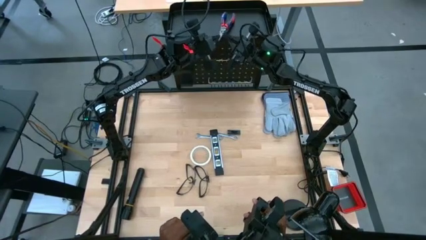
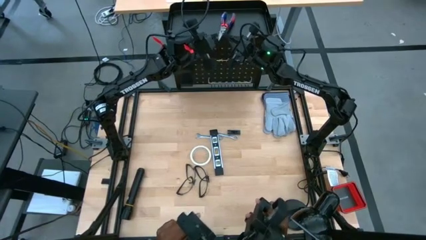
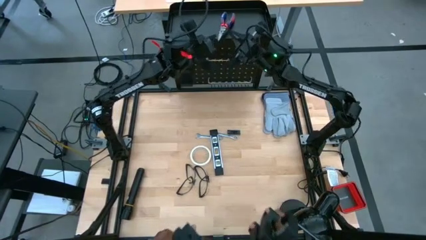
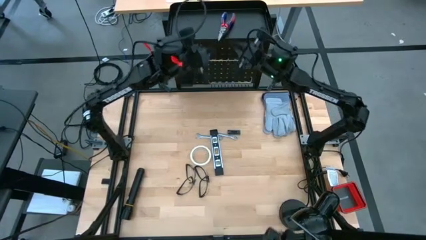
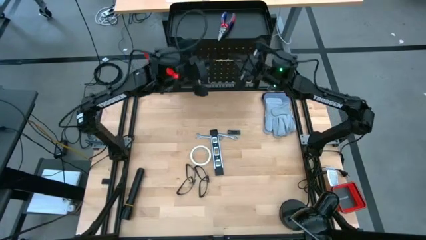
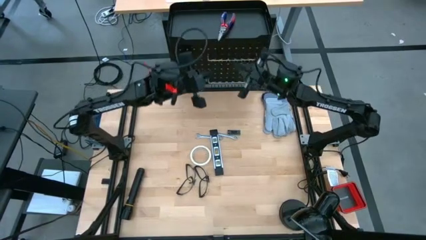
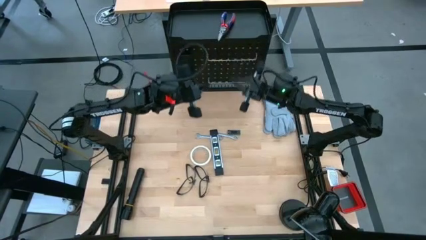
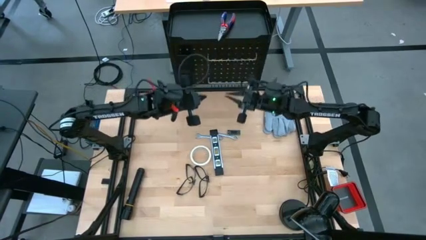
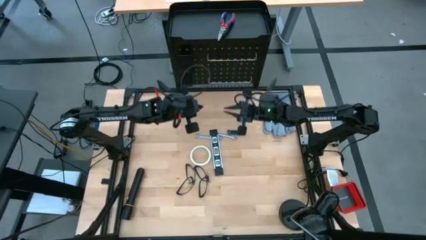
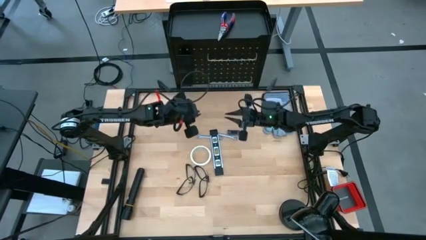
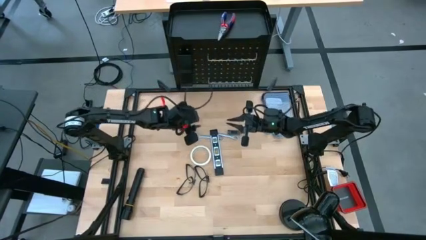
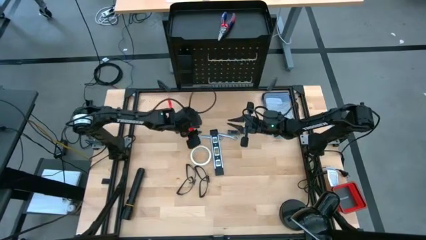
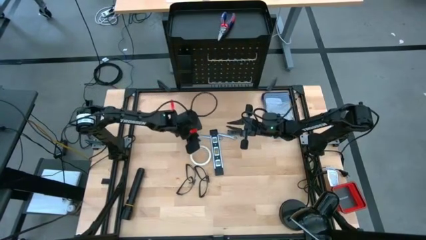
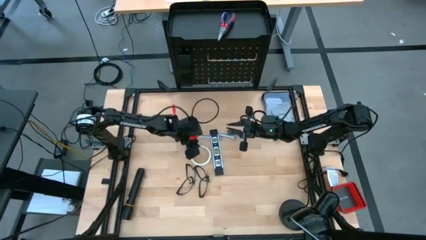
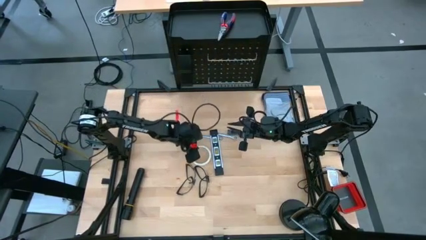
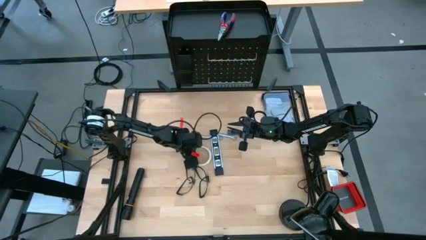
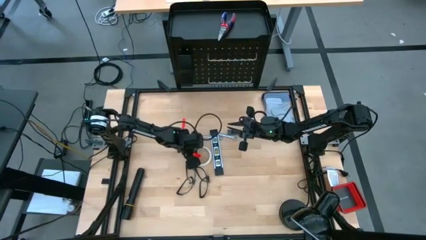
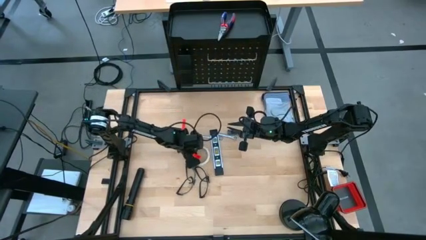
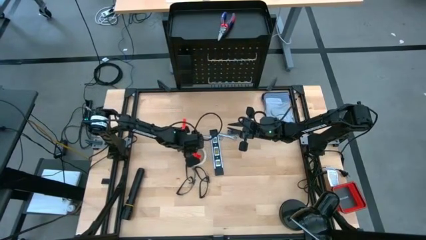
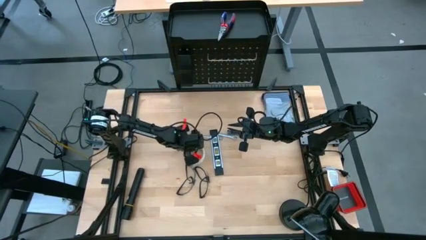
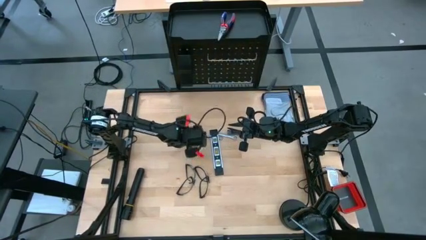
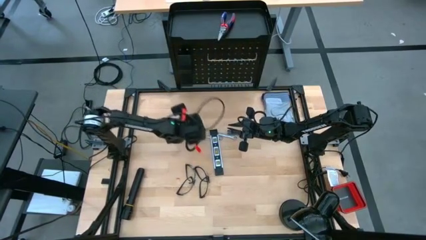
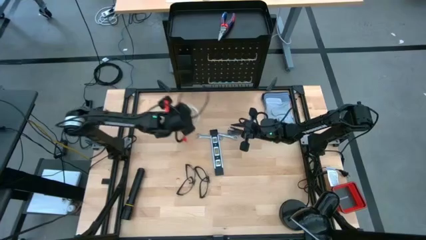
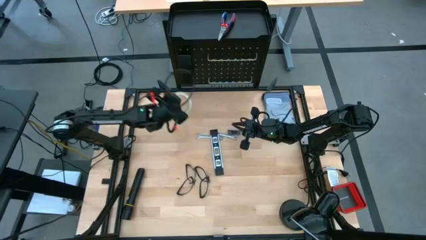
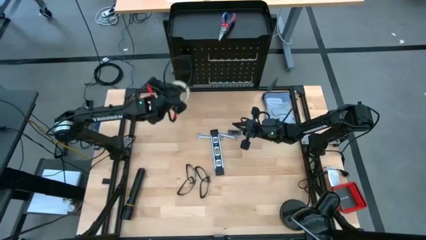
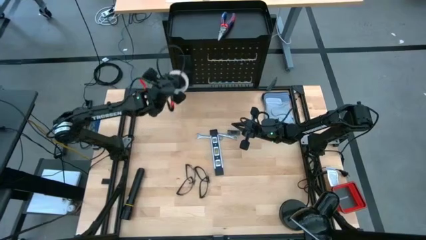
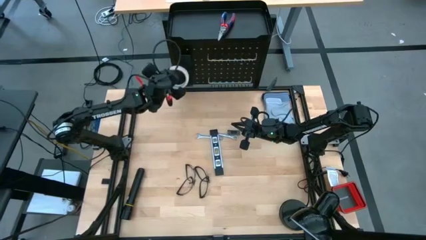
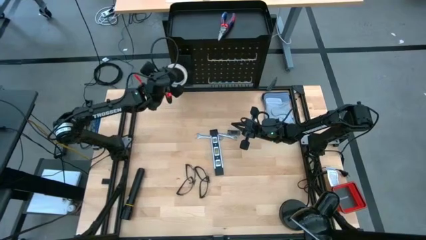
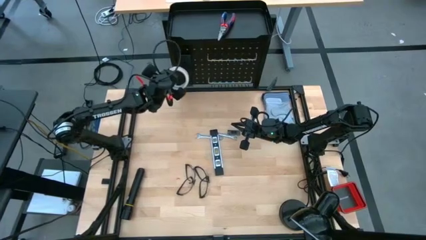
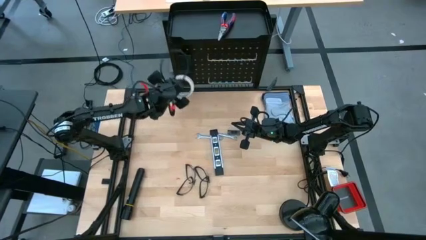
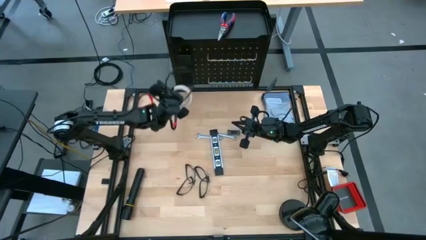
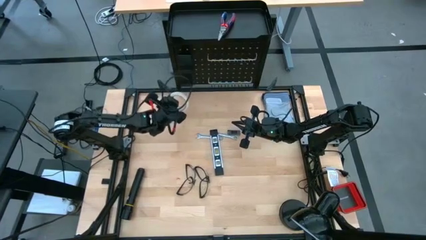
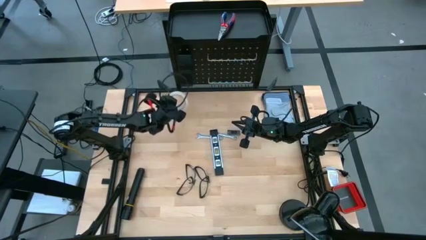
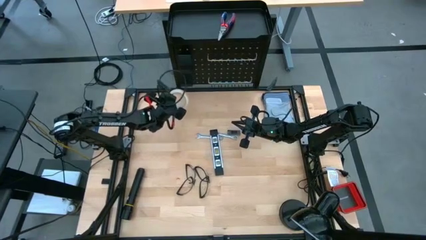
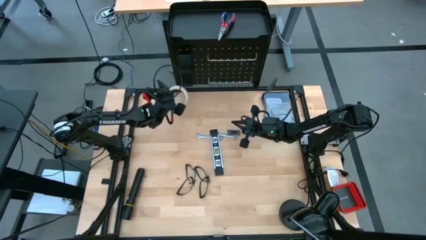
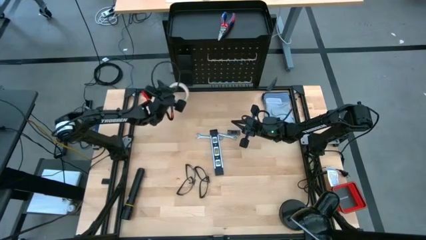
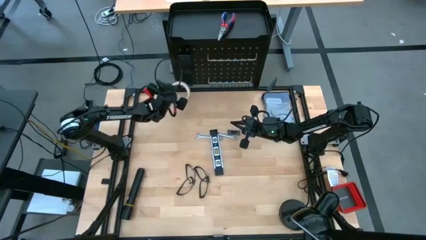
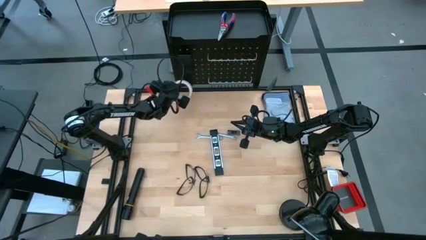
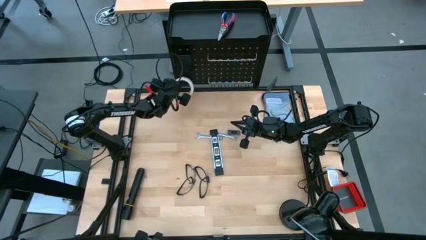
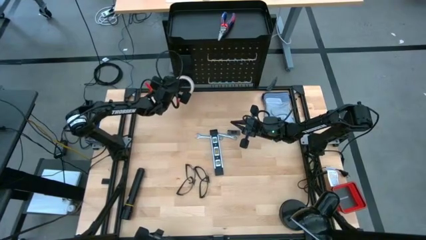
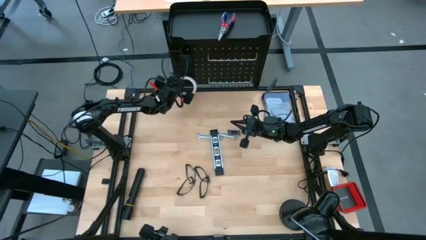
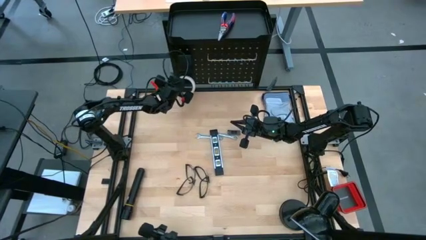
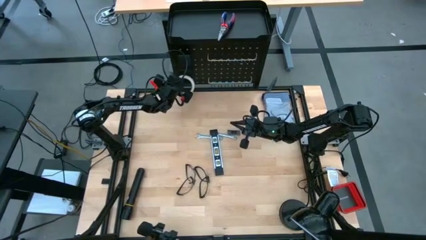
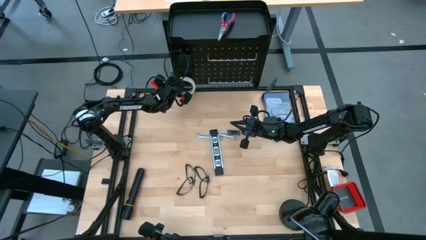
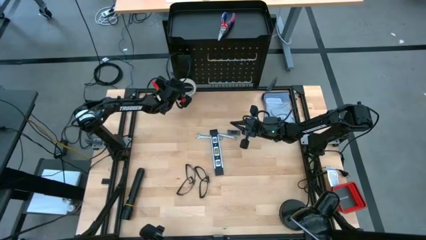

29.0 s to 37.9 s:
Task: Hang tools onto peg board
Hang the white tape on the black pegboard

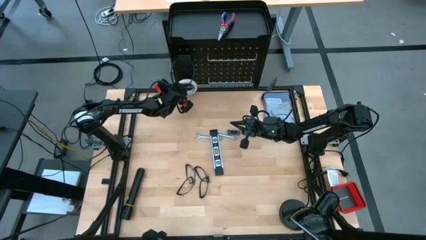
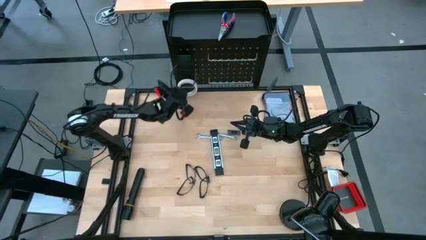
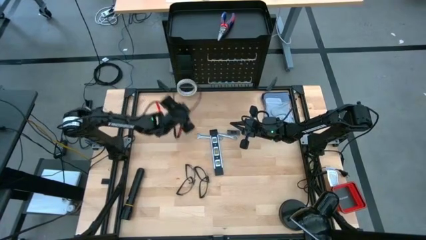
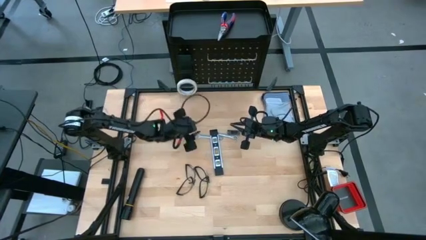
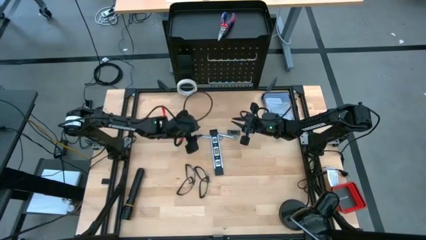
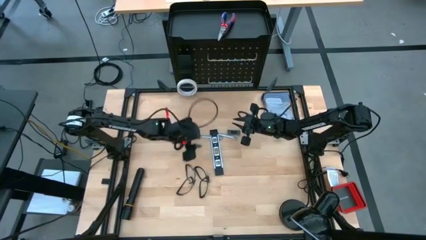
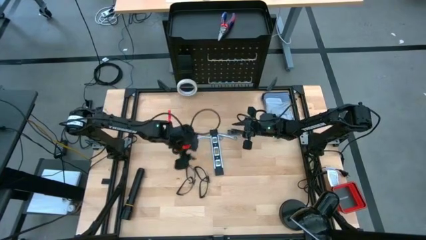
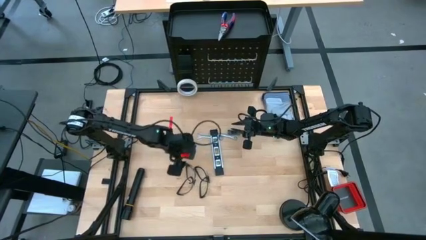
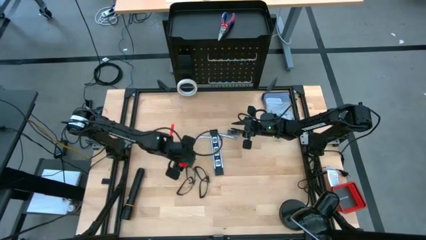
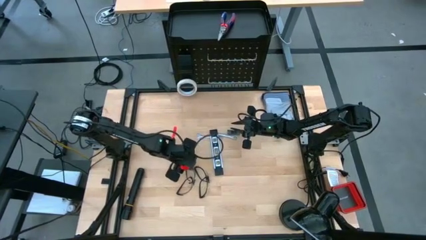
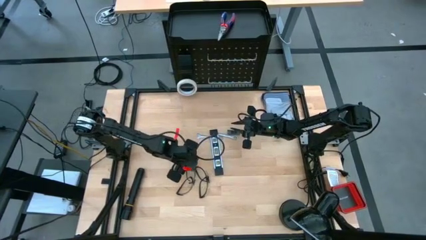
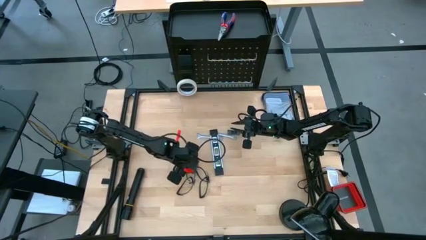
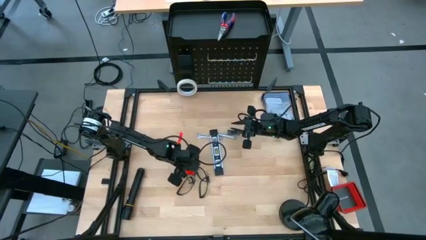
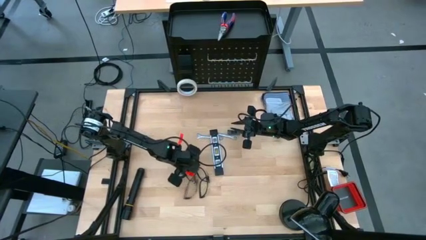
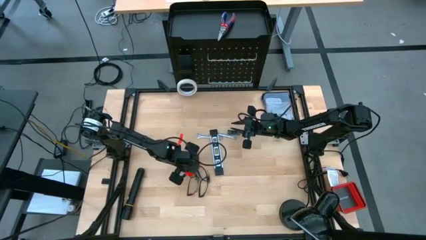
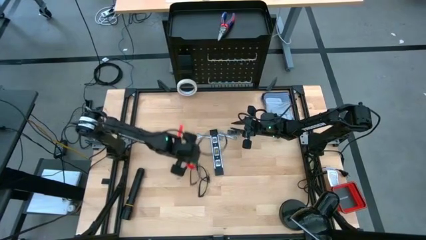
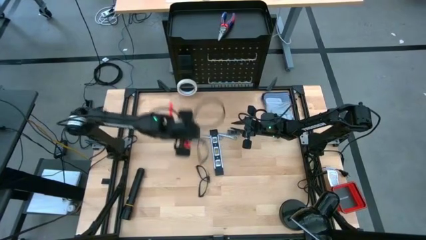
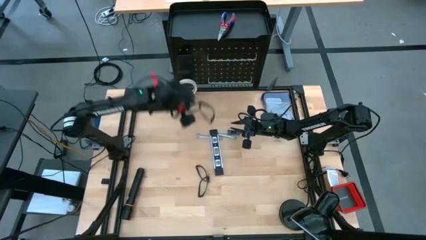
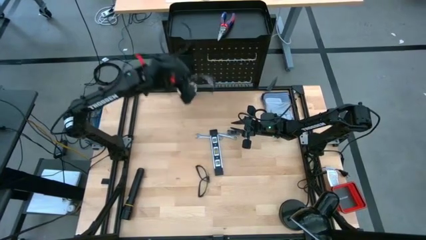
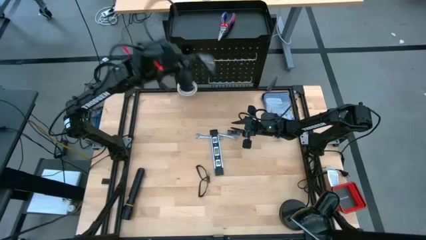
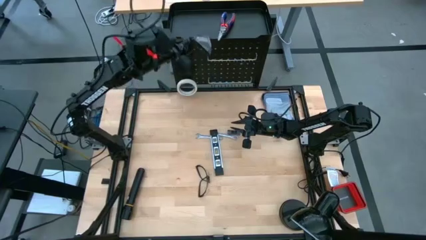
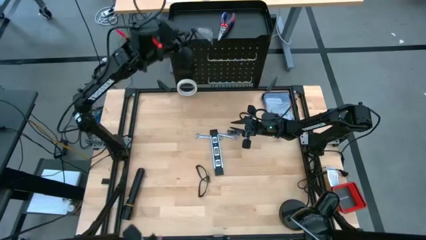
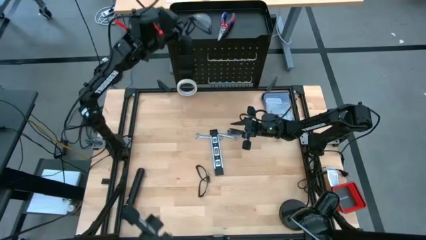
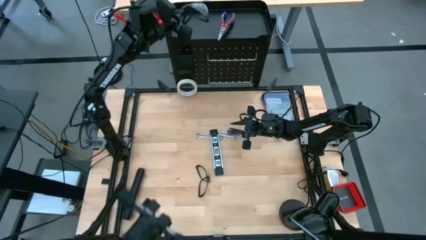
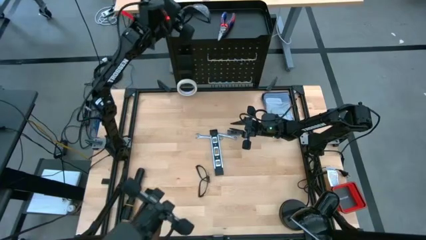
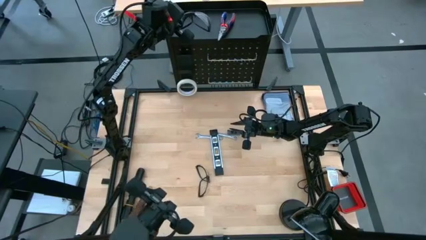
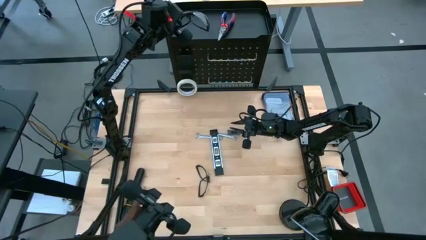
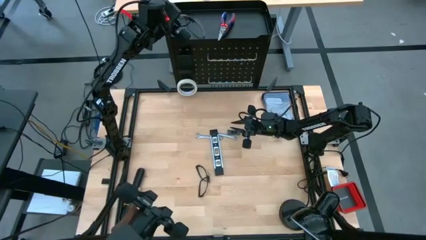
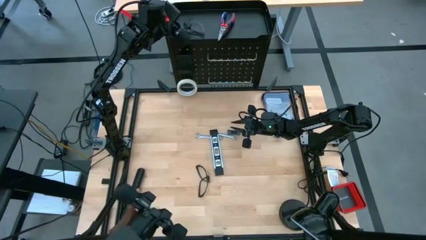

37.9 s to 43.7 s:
Put the left black safety glasses on the black pegboard
